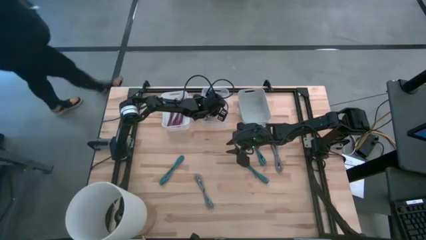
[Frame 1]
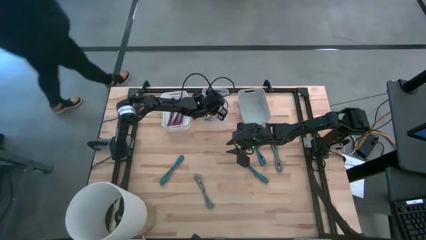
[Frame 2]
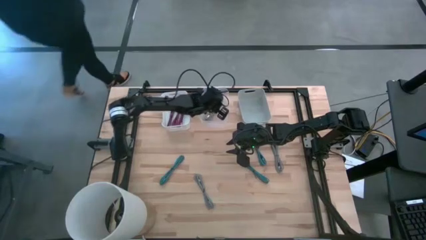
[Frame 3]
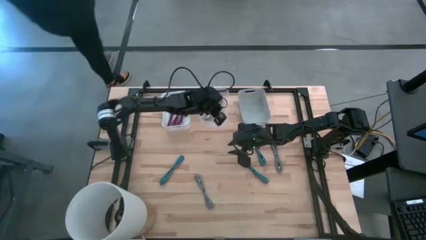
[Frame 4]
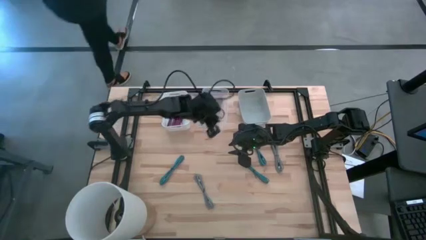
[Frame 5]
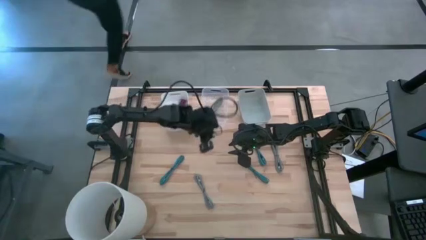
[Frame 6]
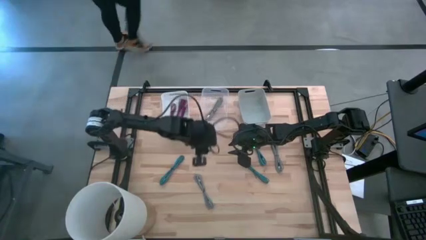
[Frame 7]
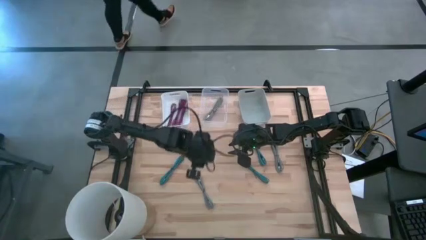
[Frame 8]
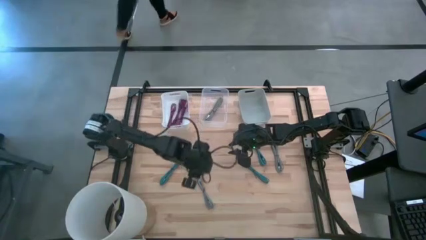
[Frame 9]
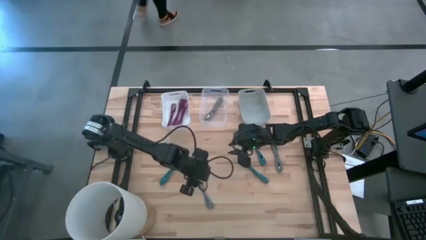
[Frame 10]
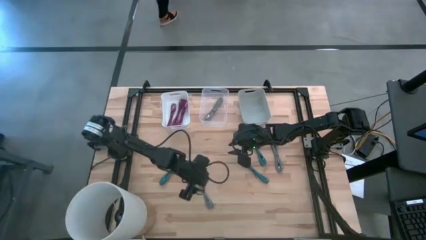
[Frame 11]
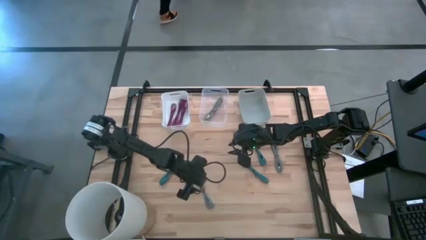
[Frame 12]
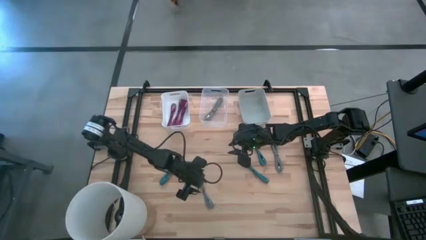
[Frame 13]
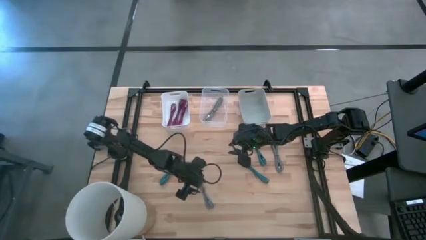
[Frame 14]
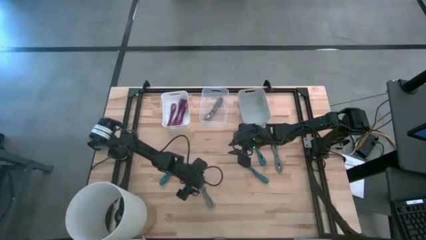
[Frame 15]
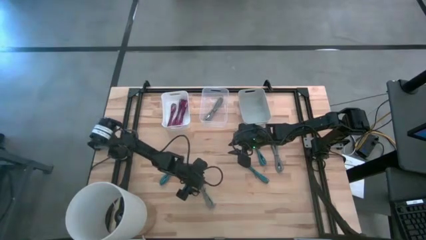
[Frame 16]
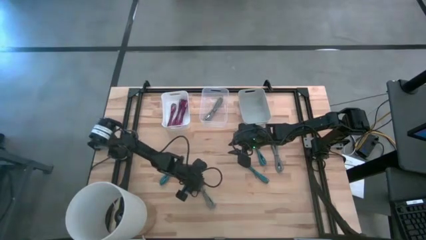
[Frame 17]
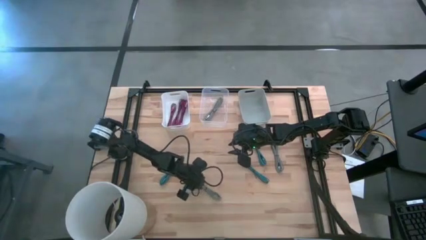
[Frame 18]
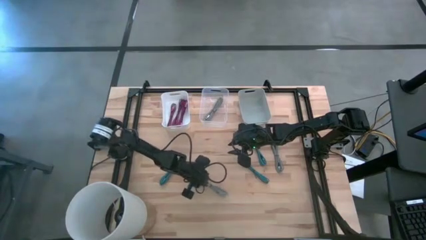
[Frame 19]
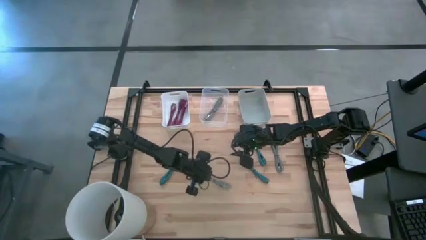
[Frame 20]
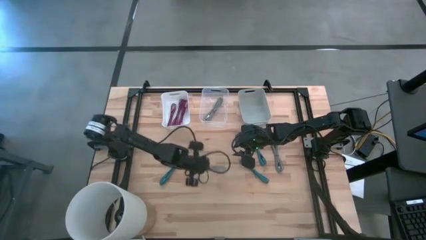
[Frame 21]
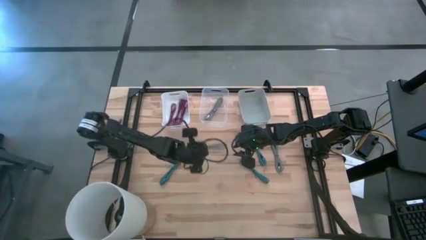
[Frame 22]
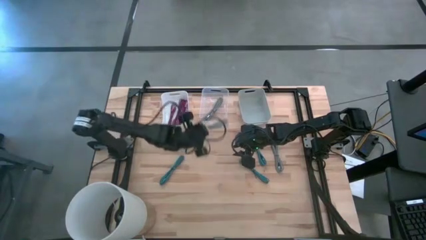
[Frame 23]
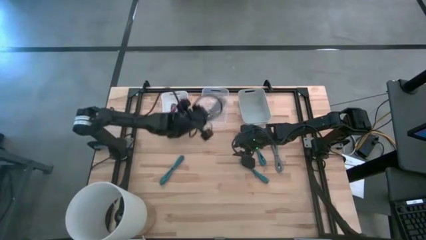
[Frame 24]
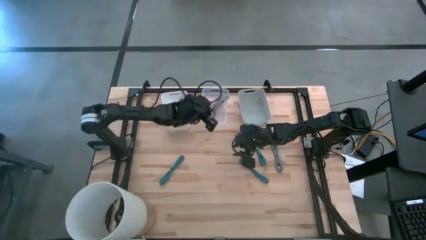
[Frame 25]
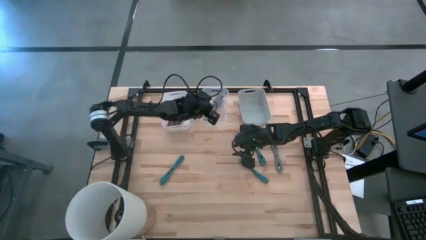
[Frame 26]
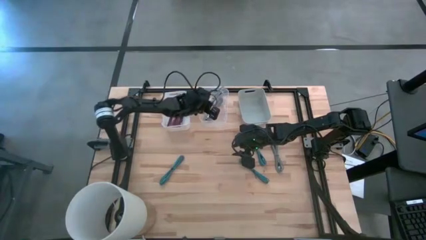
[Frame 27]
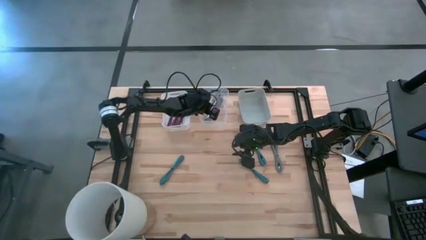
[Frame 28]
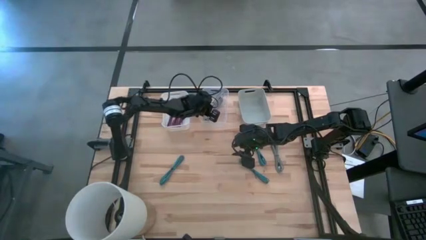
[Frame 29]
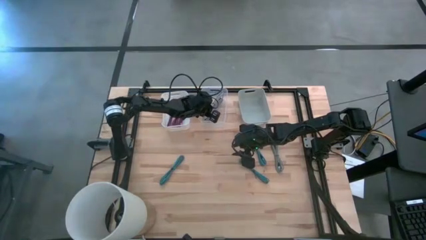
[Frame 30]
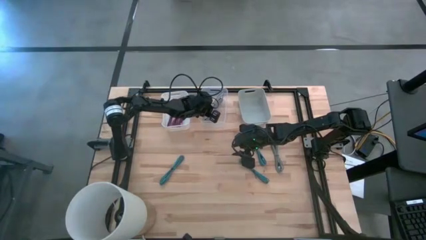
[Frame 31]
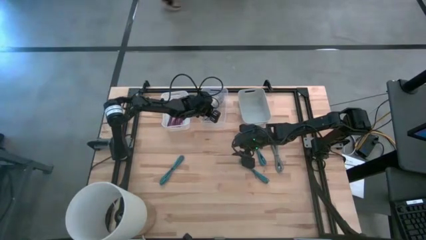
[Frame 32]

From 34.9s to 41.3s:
Task: Pick & Place USB Port
Put the left white charger cable into the transparent bin

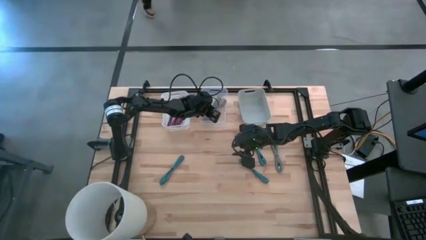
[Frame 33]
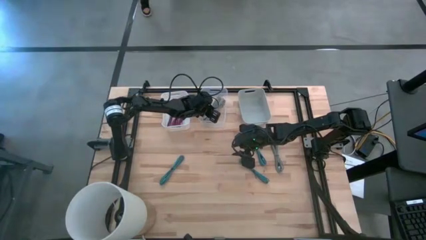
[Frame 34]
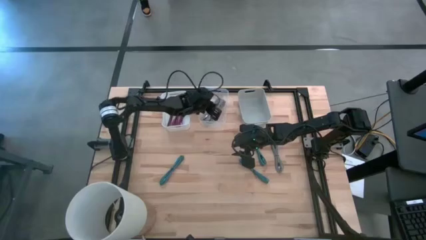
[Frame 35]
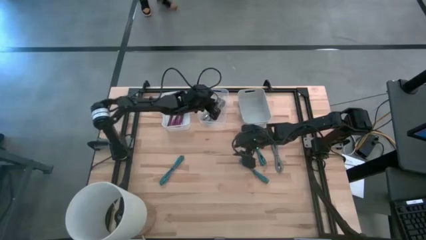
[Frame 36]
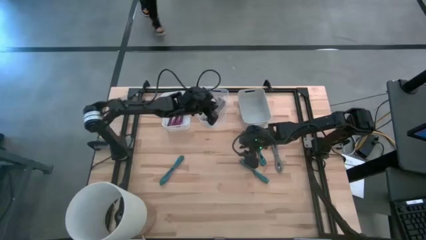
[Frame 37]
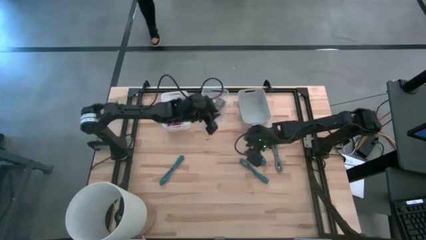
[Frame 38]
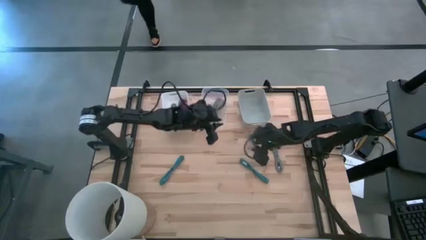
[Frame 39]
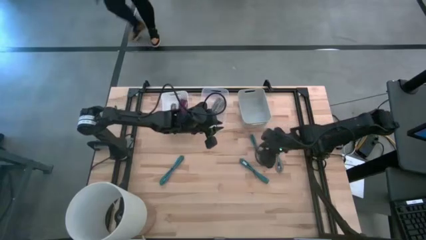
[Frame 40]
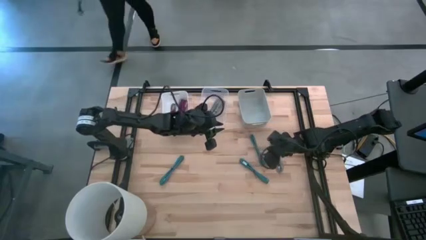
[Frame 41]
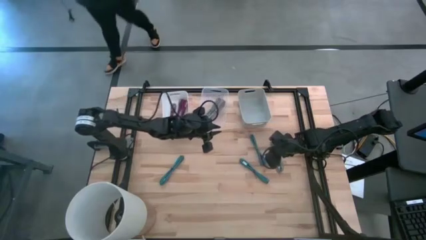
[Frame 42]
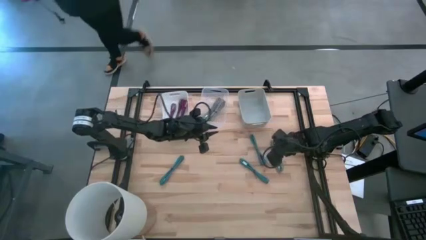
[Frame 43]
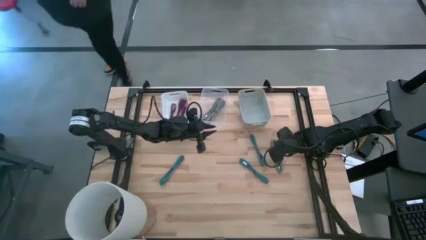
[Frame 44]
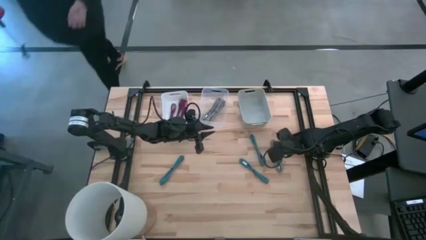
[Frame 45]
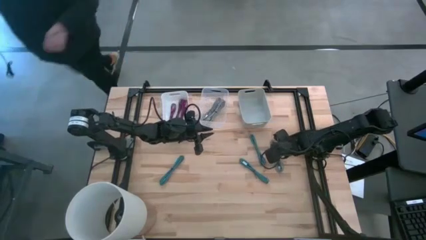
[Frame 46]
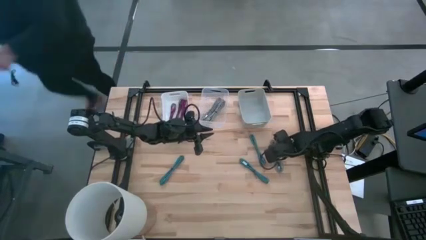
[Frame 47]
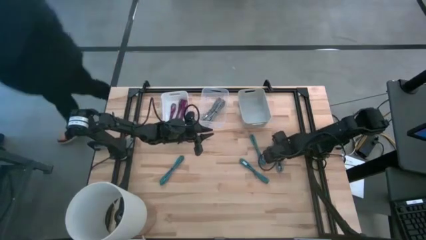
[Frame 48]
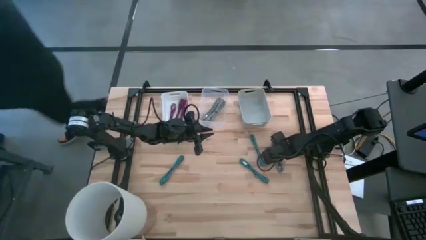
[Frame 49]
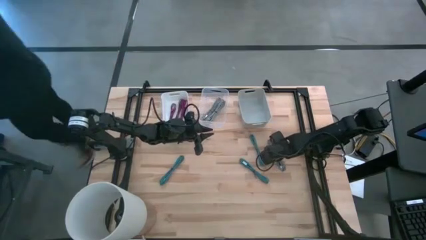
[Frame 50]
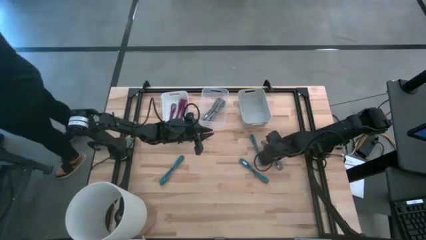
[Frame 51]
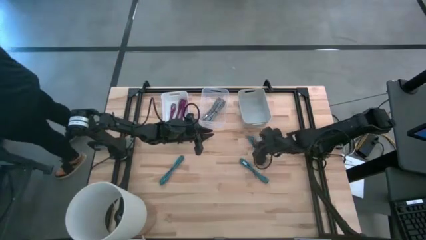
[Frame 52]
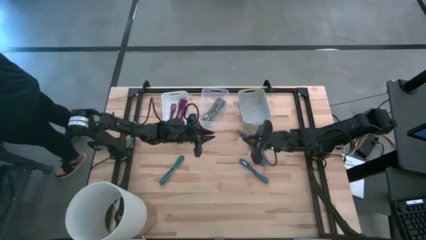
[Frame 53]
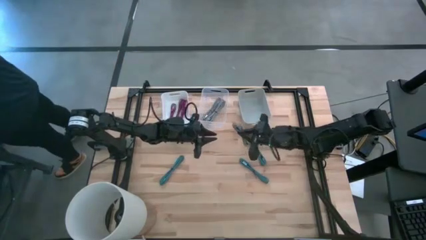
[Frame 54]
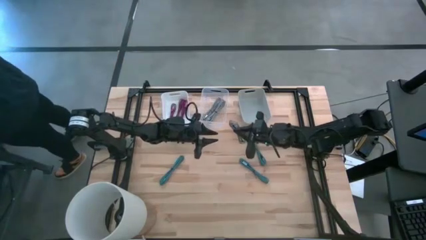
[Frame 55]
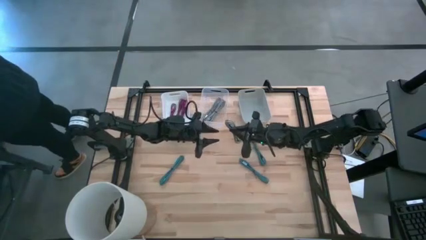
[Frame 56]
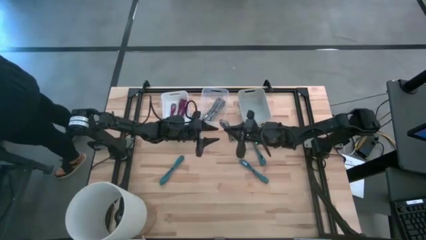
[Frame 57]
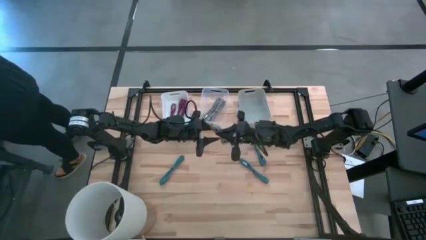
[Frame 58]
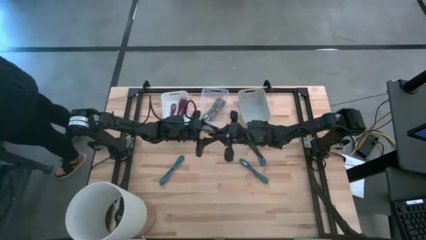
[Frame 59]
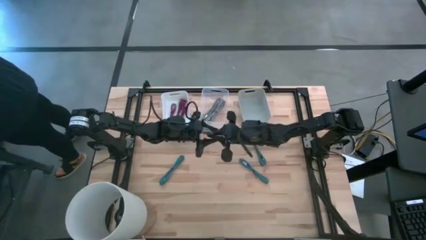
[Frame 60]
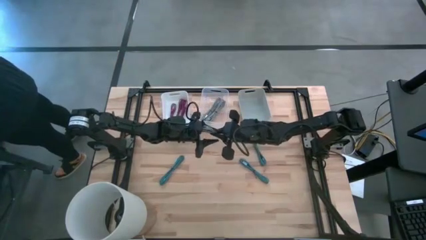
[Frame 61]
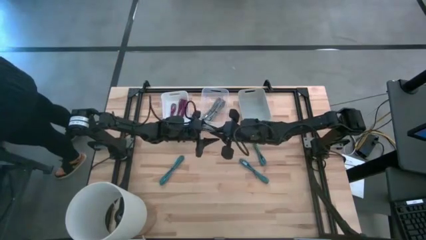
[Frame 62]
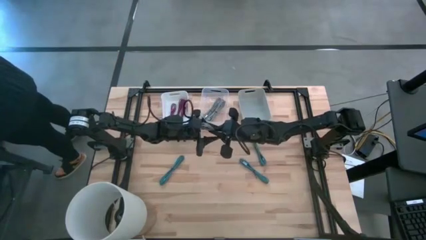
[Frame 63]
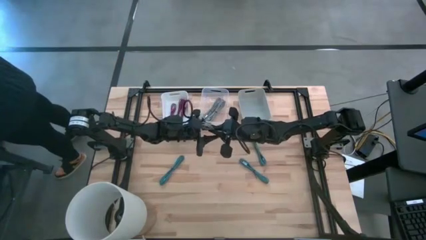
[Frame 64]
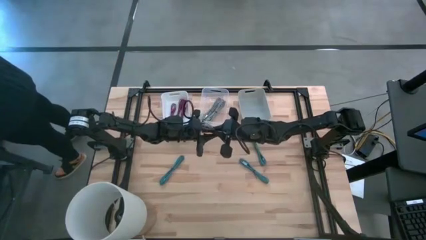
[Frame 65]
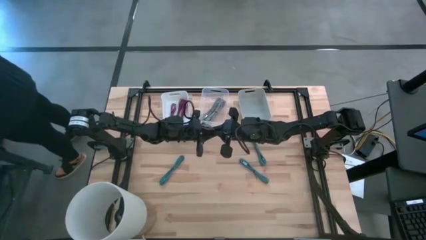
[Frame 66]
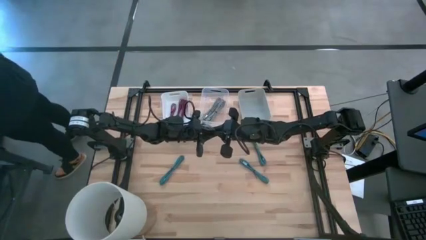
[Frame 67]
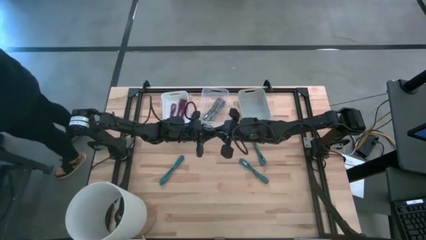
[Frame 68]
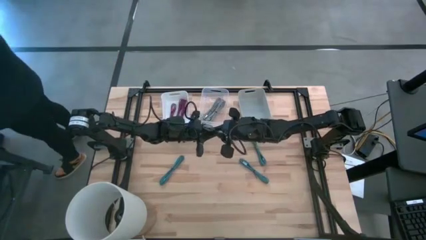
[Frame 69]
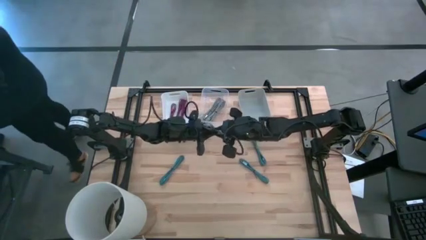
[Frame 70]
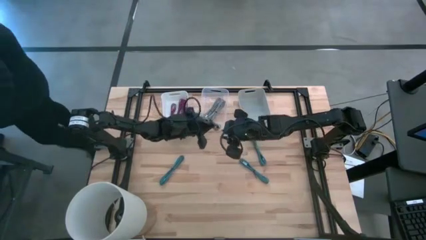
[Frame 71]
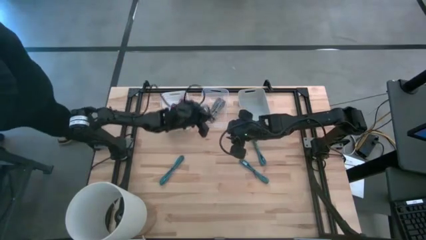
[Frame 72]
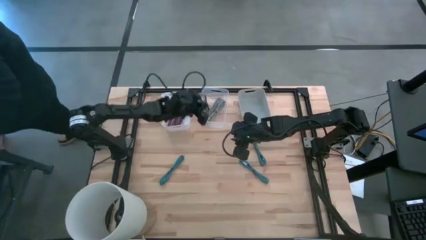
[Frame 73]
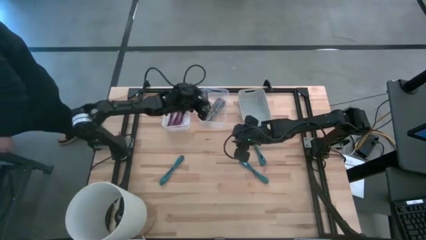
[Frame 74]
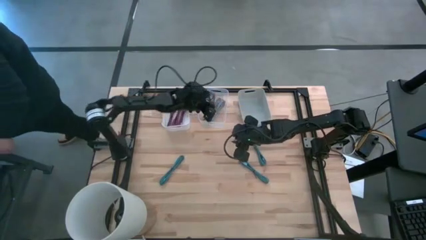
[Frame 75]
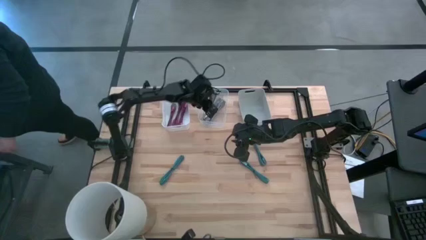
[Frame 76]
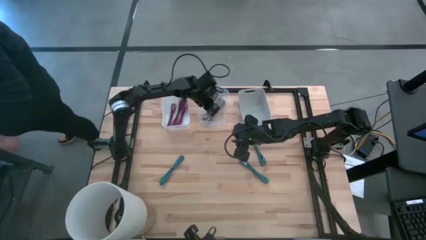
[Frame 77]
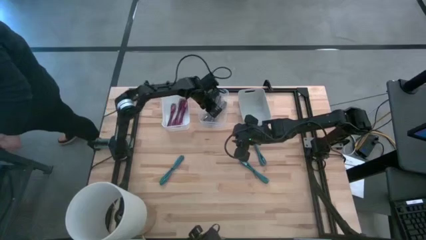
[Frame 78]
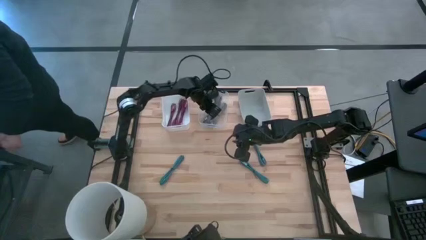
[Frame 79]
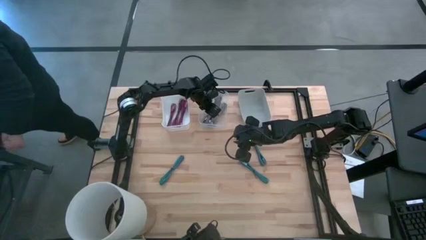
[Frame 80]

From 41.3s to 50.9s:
Put the white charger cable into the transparent bin
